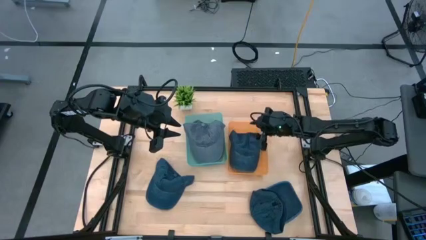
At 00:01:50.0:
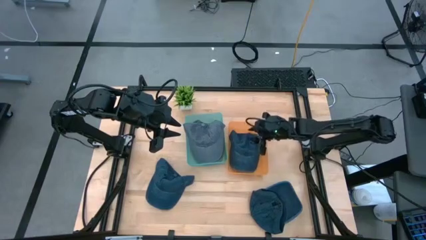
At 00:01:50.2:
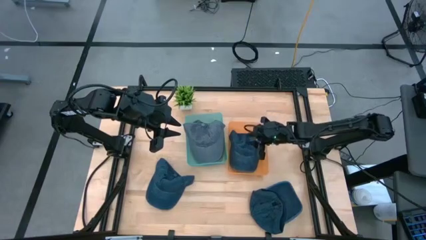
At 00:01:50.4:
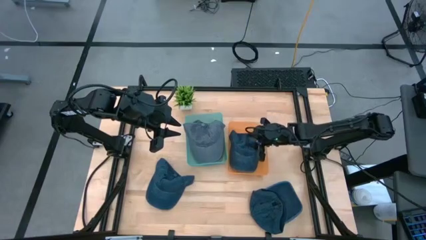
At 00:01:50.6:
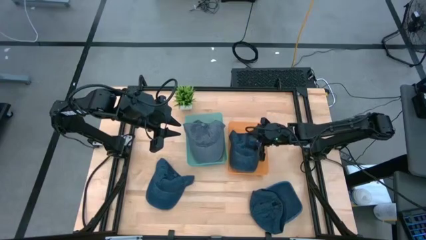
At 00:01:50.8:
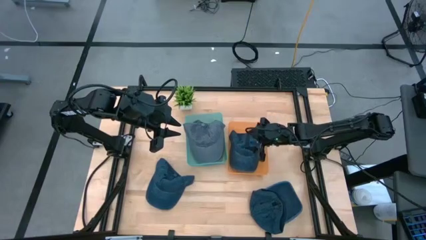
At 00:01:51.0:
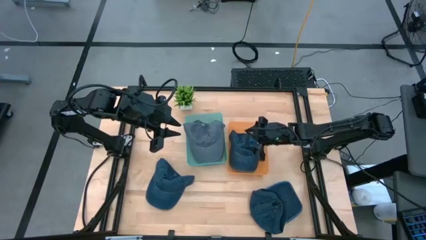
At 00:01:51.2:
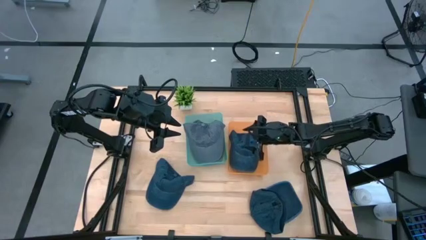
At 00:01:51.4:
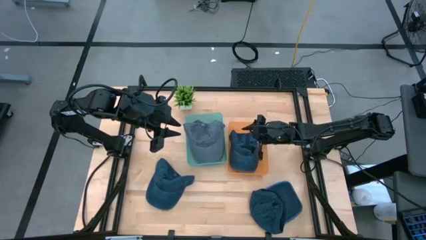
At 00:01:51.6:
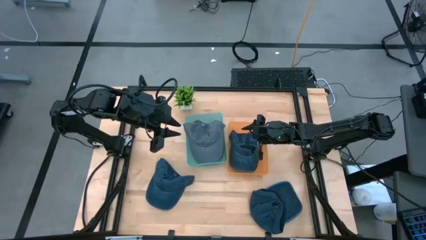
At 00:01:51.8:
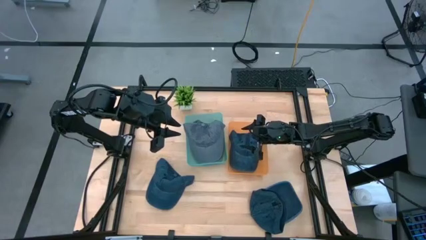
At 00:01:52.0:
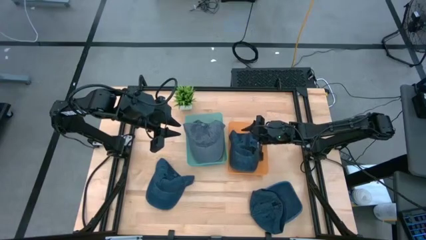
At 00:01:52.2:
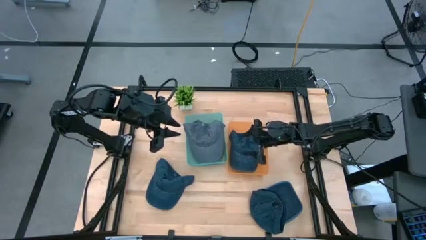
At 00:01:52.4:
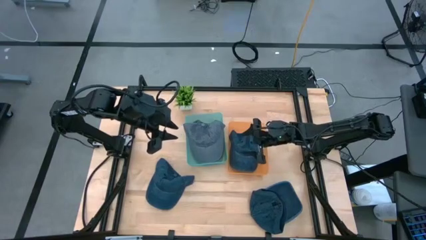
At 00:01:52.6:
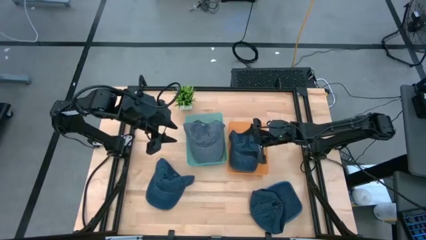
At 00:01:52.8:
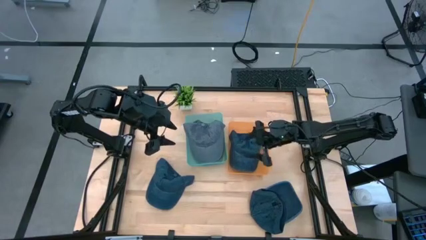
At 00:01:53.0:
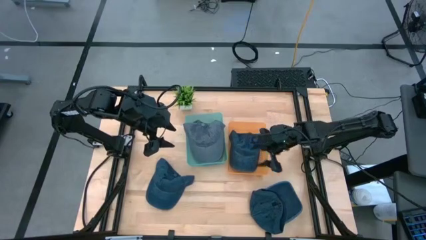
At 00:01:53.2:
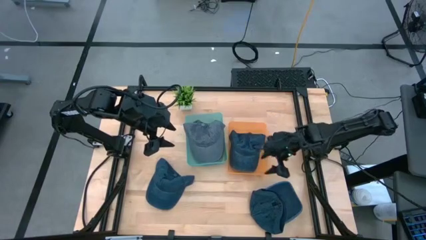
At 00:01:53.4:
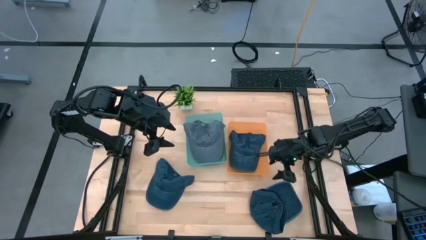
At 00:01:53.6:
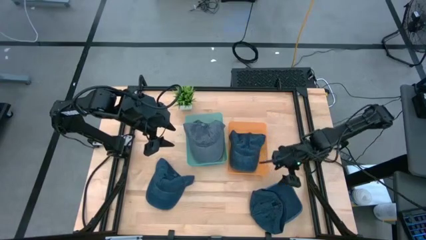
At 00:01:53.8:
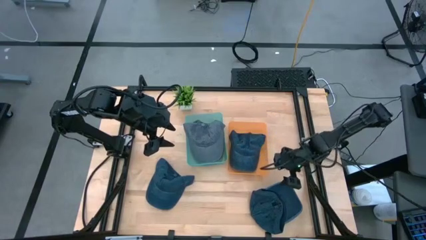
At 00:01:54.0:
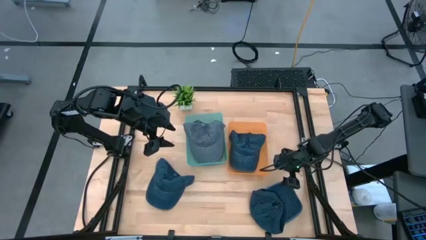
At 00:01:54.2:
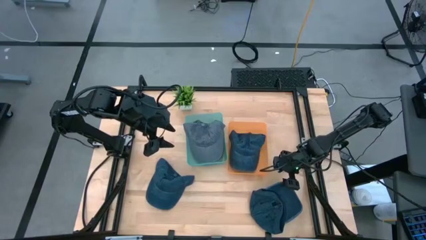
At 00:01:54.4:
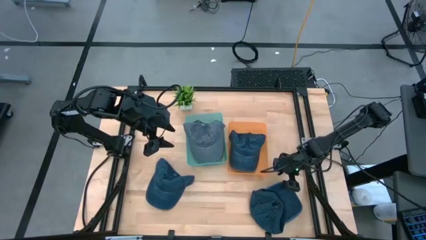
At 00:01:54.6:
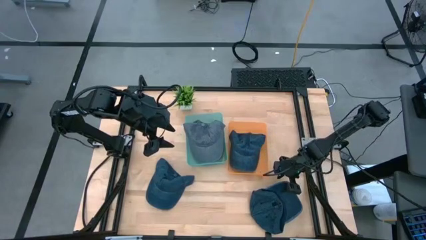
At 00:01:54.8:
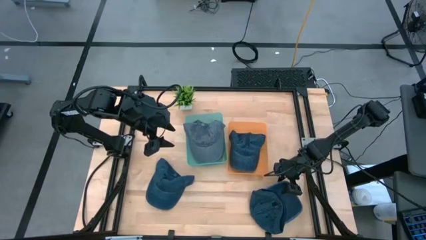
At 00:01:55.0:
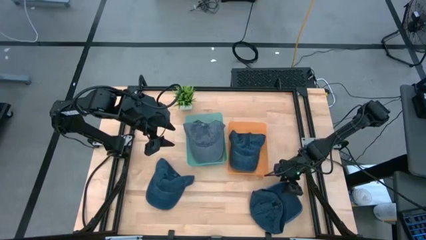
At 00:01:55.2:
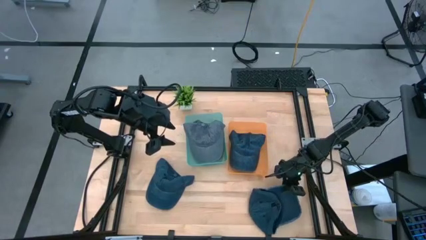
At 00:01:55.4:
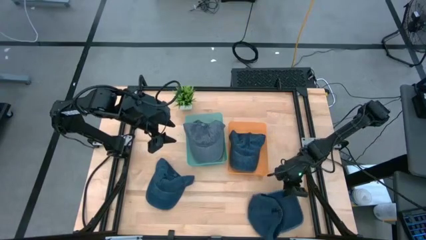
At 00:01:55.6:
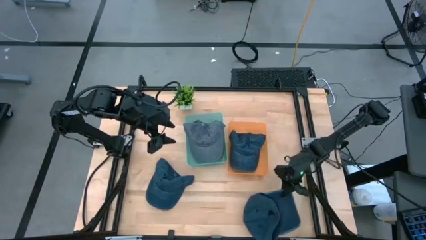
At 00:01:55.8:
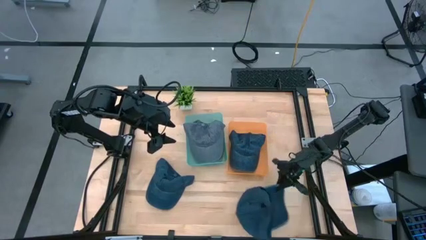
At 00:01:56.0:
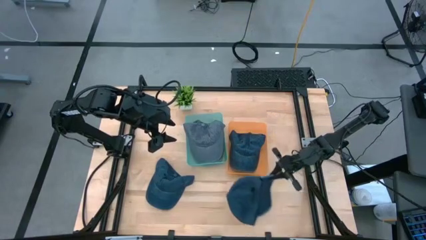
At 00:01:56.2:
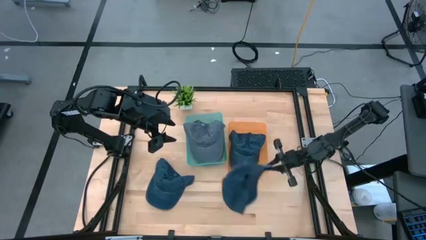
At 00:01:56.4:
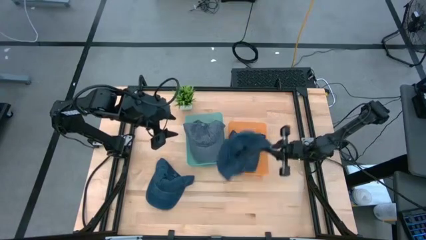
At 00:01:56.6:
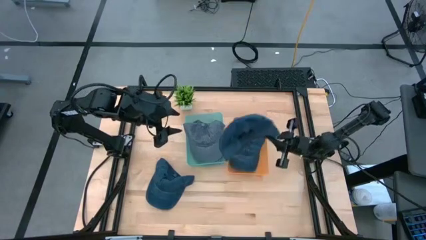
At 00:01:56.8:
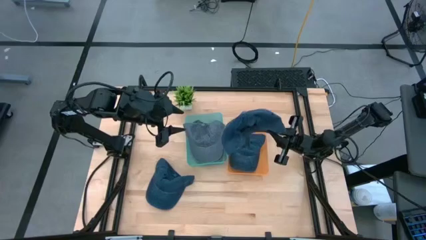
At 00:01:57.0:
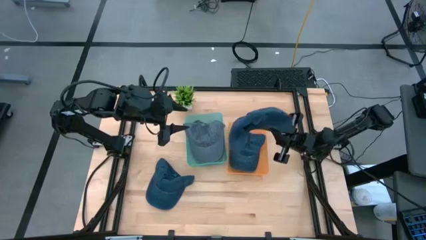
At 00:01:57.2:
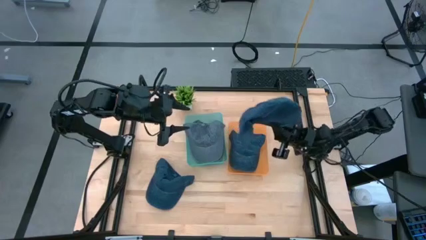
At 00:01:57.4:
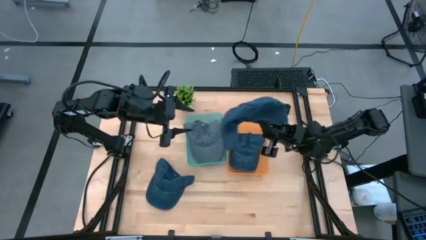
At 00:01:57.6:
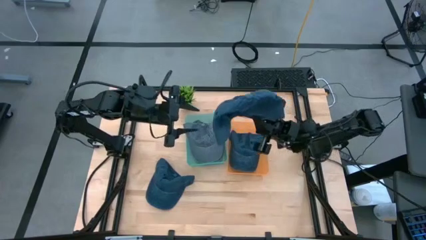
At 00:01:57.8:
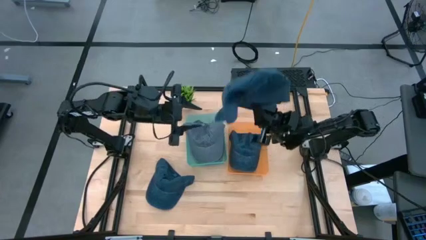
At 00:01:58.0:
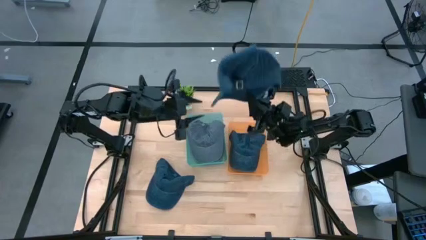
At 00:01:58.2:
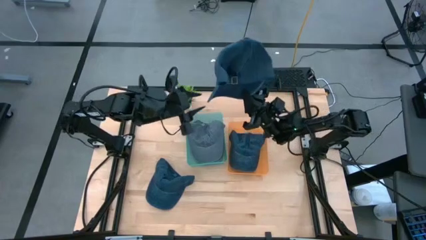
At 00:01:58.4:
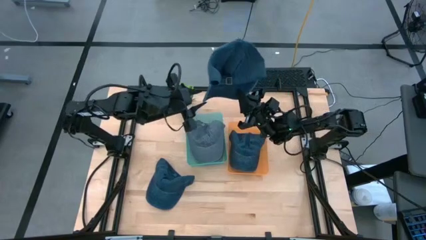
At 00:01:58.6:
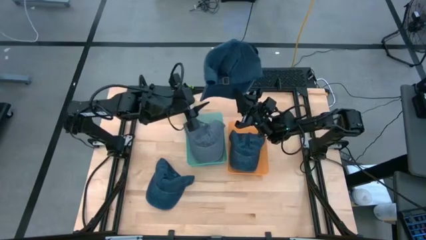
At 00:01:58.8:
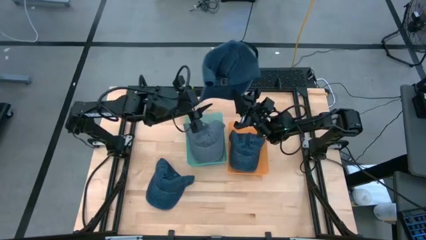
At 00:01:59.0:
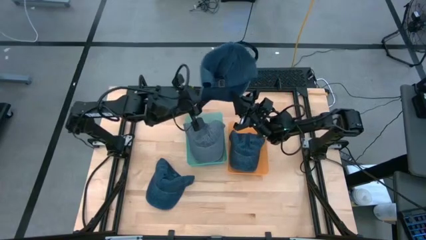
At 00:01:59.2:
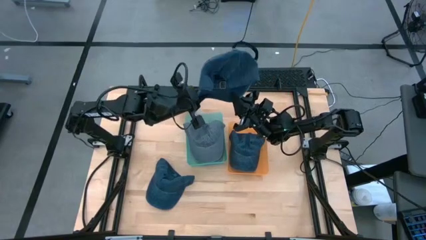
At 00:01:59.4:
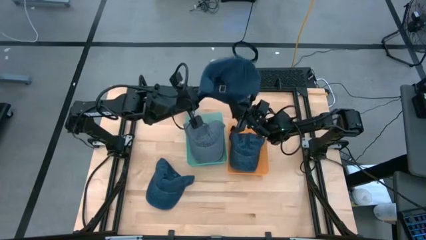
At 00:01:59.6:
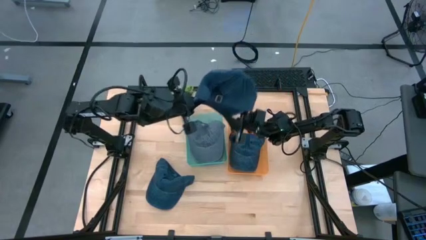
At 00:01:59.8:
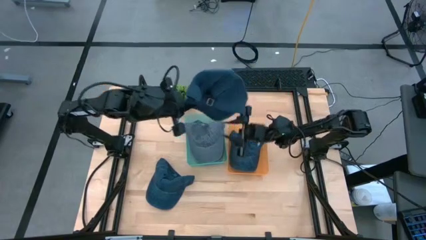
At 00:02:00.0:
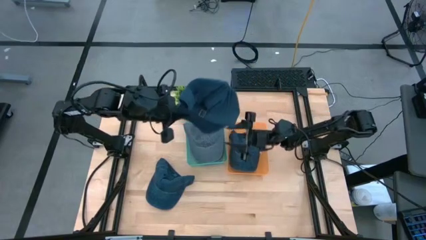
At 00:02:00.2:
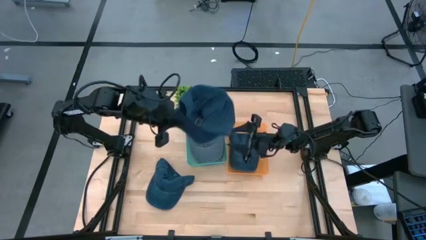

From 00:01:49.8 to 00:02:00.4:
Task: Pick & Place hat
Put the right blue cap into the orange bin

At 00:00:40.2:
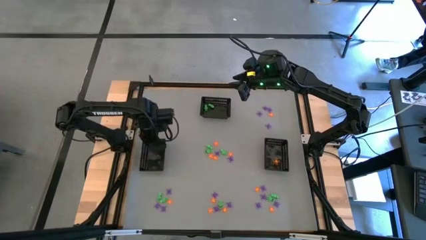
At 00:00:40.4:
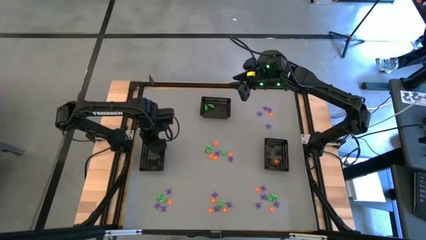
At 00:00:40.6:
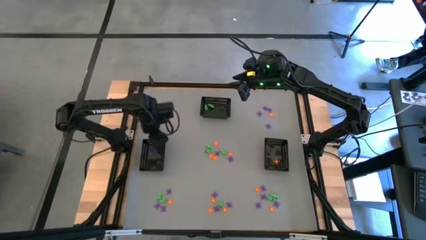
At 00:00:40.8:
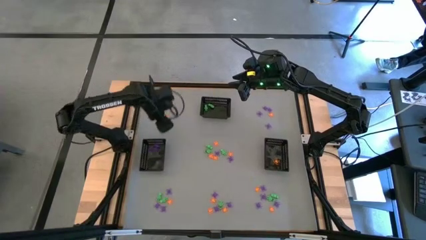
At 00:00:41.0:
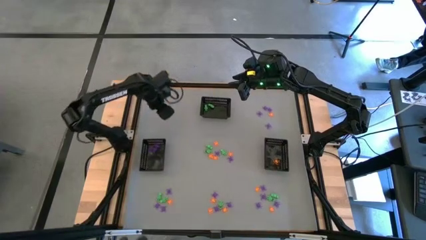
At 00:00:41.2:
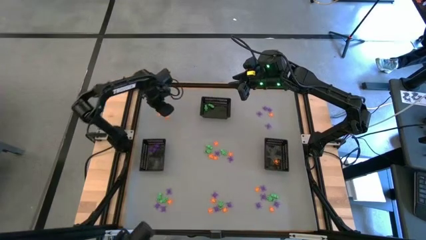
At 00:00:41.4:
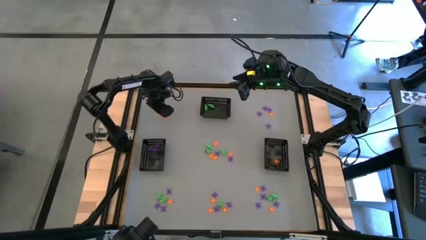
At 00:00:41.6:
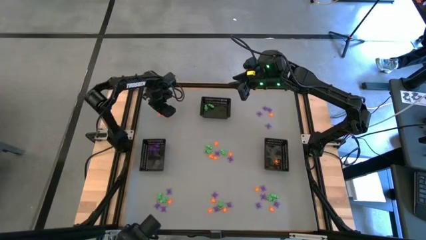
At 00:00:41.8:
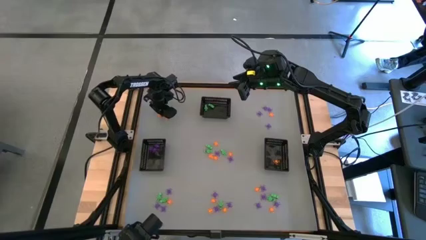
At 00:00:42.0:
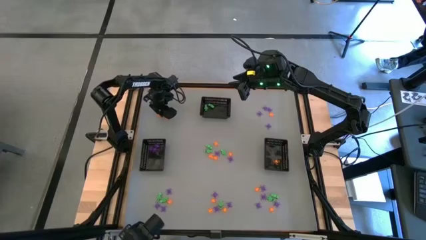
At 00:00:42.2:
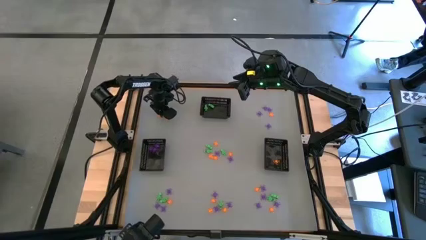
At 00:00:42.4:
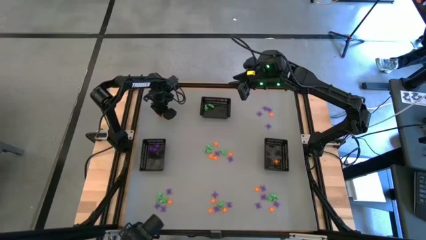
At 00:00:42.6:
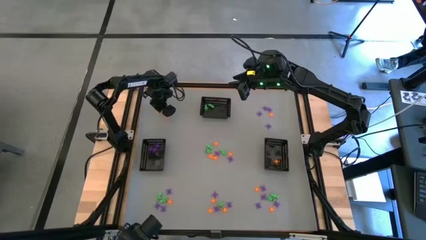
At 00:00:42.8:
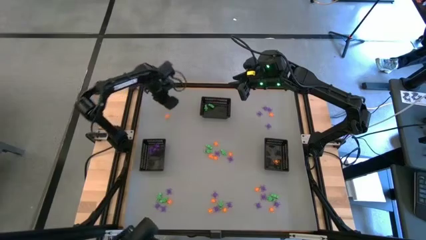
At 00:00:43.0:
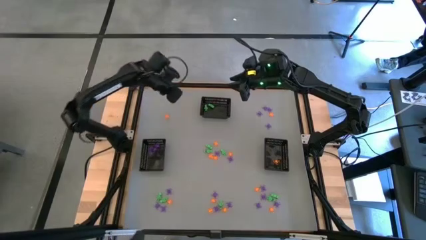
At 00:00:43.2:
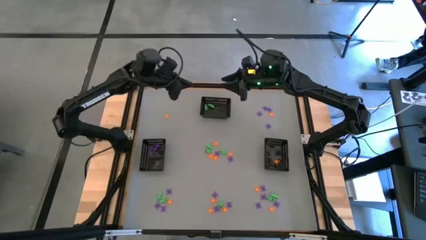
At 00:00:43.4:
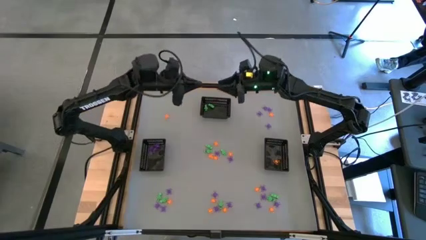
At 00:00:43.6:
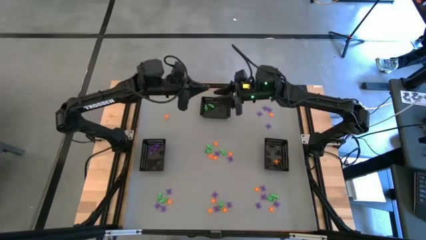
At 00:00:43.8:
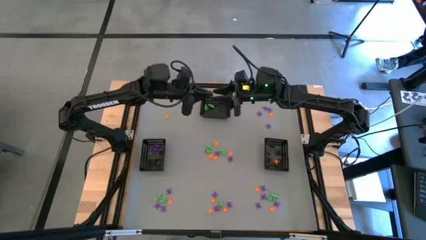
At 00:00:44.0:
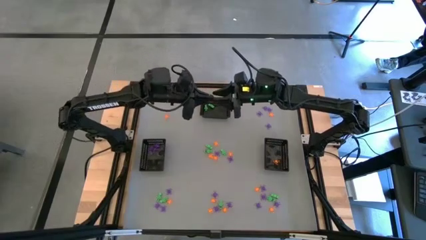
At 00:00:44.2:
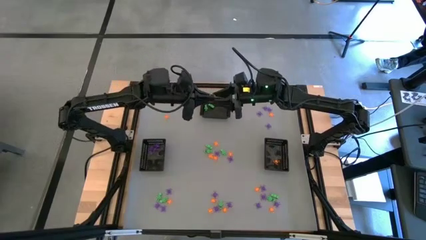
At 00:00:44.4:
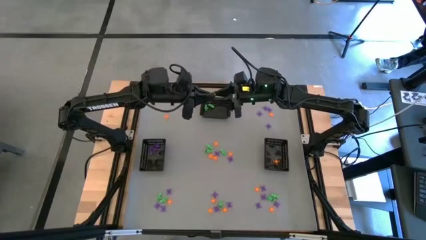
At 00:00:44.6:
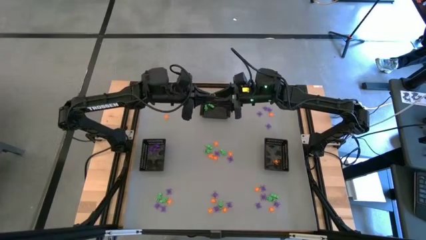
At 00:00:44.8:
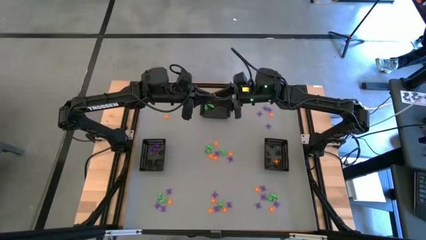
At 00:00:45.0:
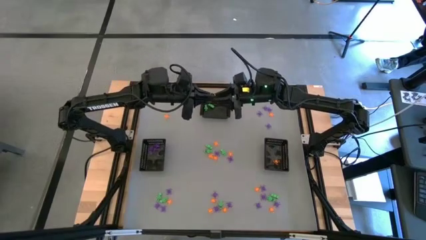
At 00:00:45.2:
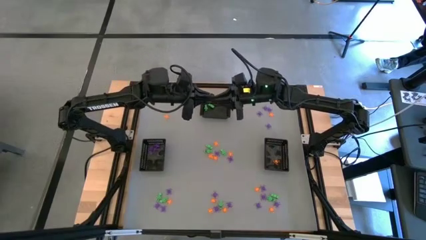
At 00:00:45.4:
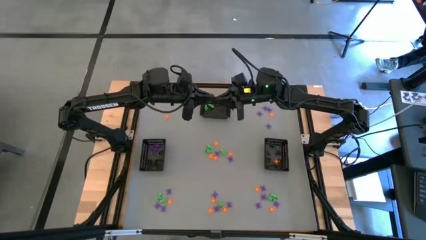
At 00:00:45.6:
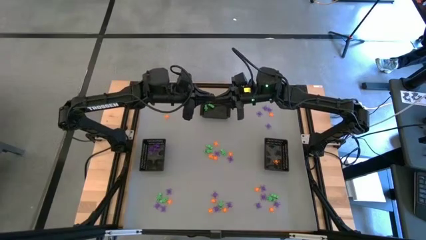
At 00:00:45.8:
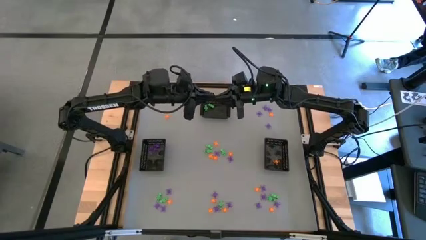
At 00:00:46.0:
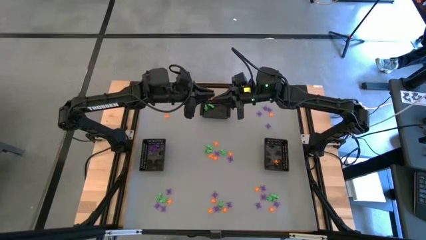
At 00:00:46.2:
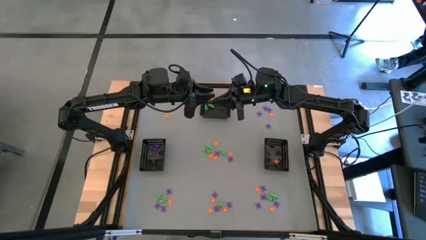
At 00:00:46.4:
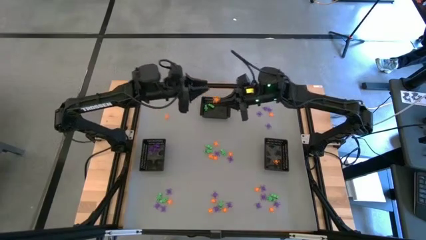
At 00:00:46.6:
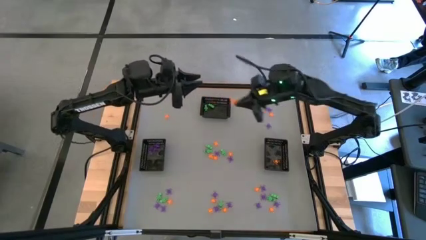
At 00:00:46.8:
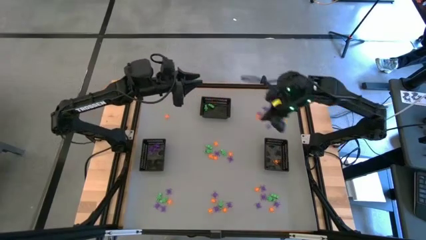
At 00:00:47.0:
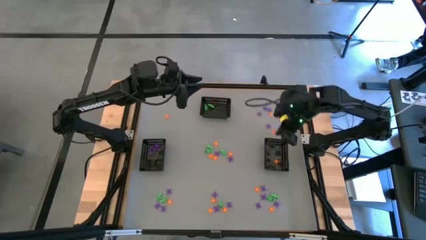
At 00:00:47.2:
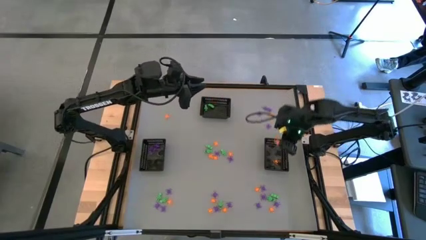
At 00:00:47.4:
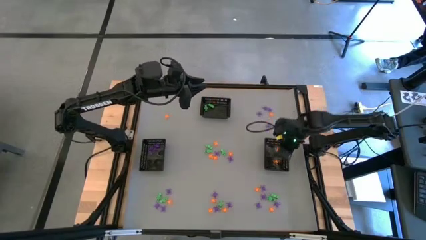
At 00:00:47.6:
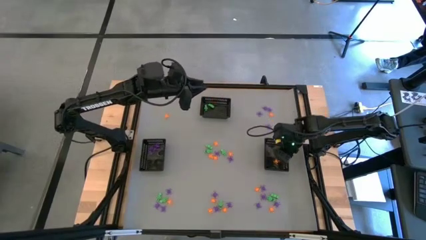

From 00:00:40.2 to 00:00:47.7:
Task: Sort Halloween decoration
Put the orange spider toy into the right bin
